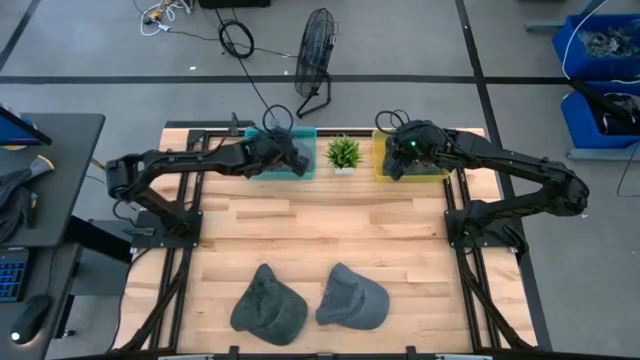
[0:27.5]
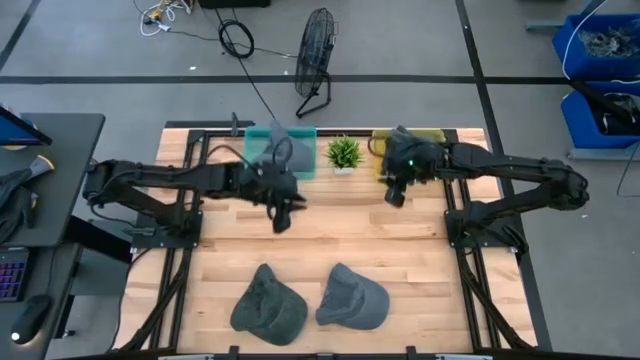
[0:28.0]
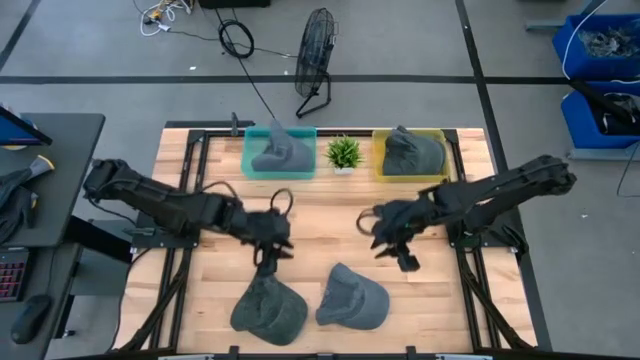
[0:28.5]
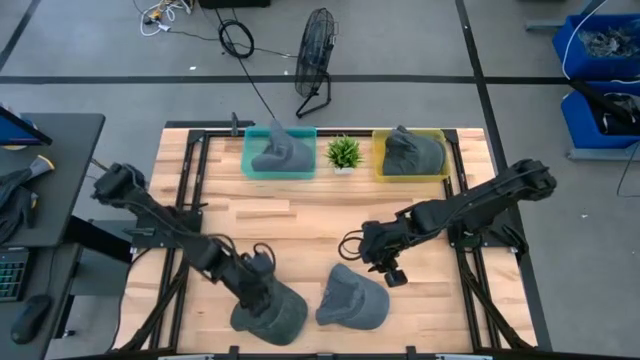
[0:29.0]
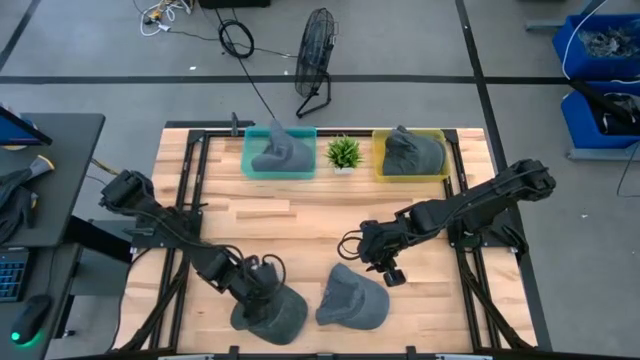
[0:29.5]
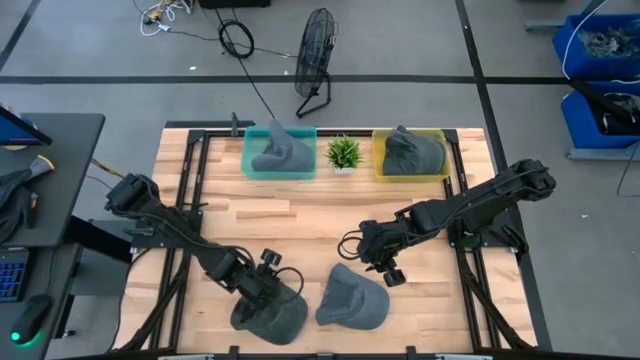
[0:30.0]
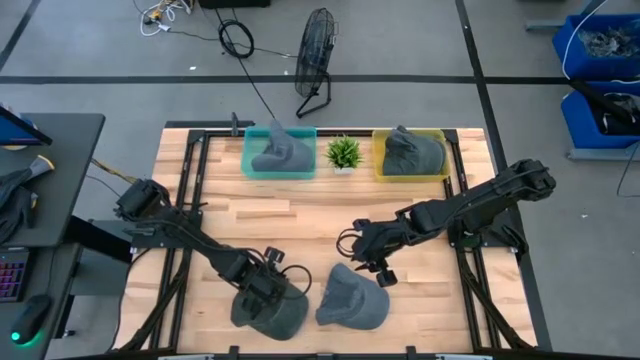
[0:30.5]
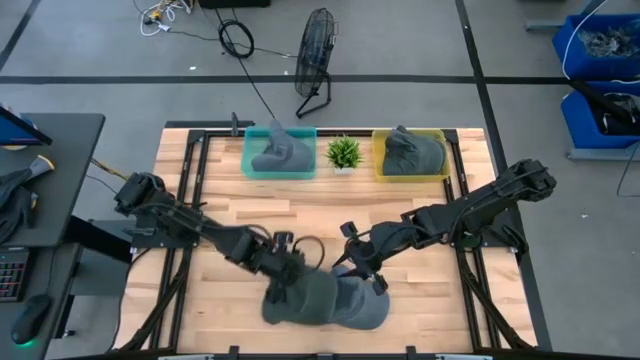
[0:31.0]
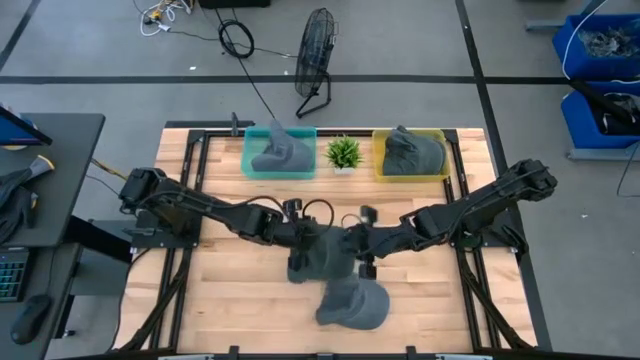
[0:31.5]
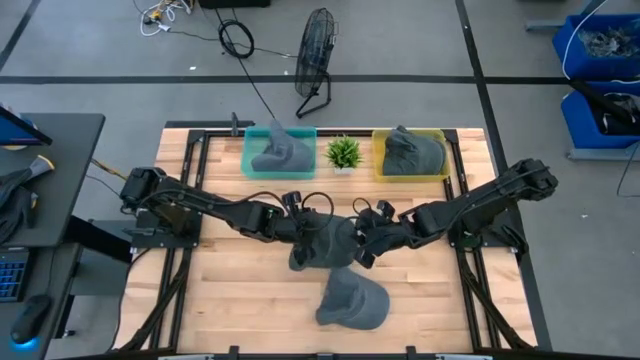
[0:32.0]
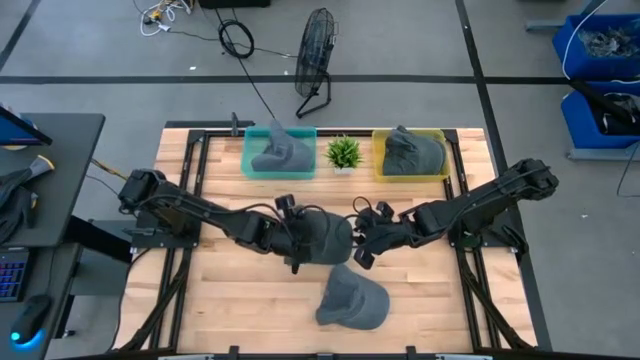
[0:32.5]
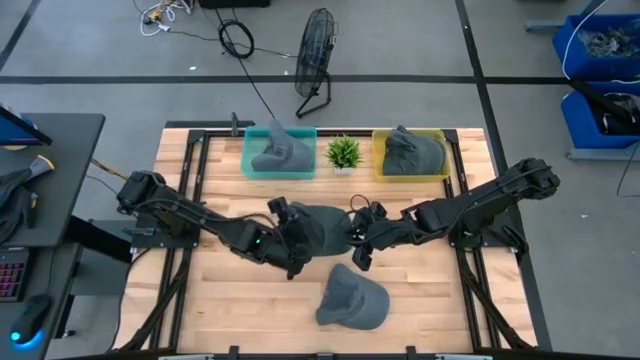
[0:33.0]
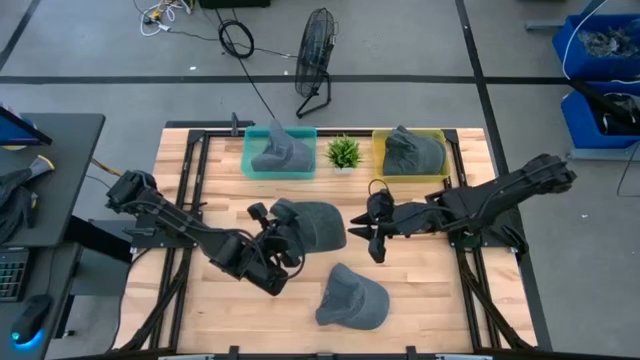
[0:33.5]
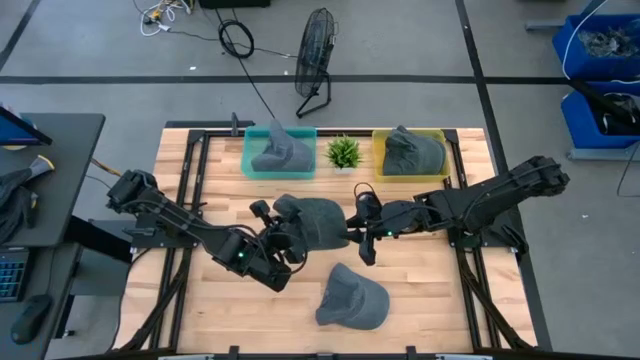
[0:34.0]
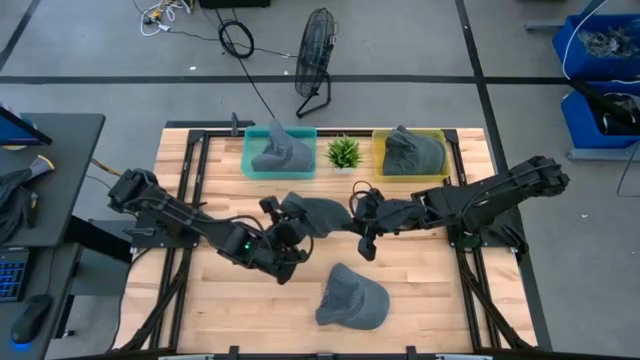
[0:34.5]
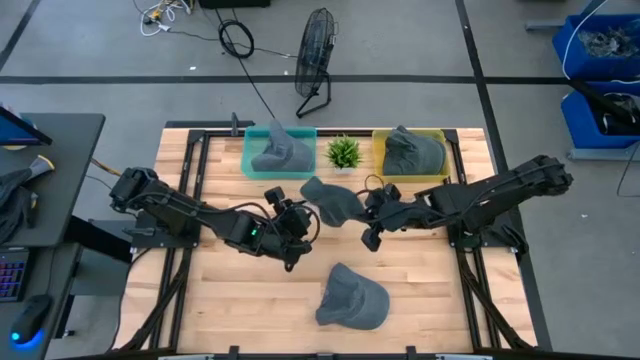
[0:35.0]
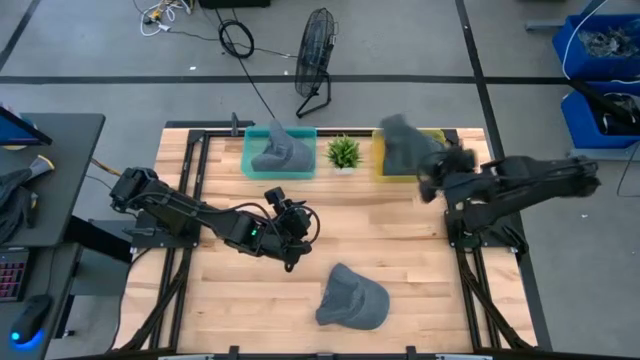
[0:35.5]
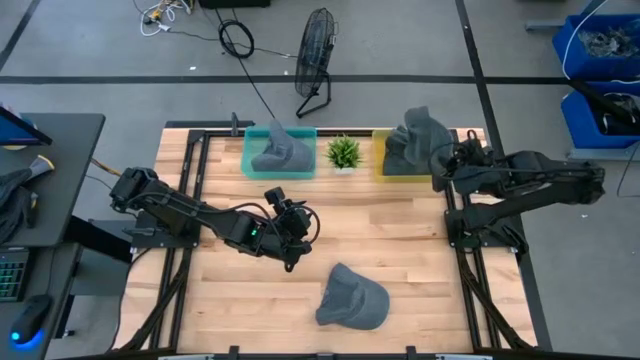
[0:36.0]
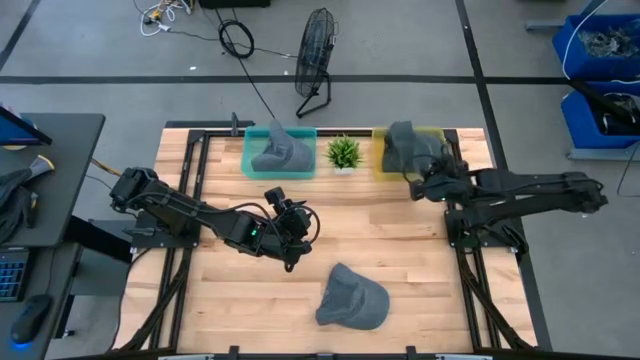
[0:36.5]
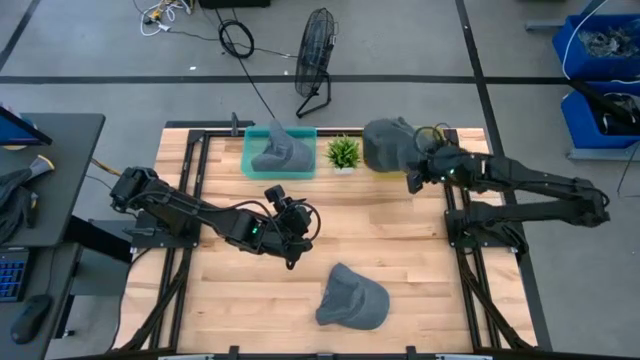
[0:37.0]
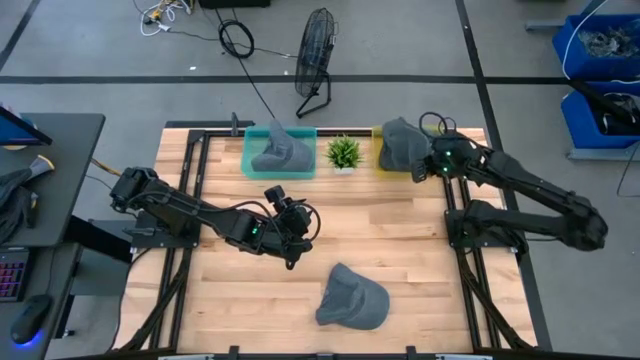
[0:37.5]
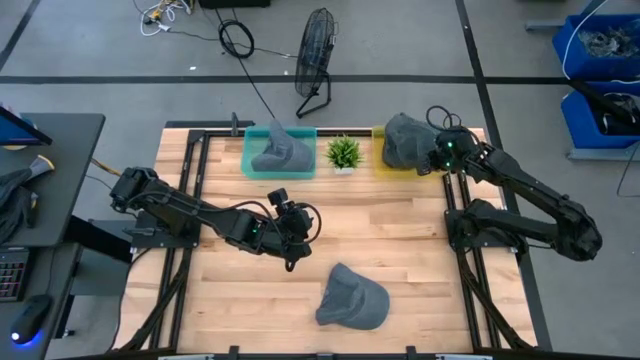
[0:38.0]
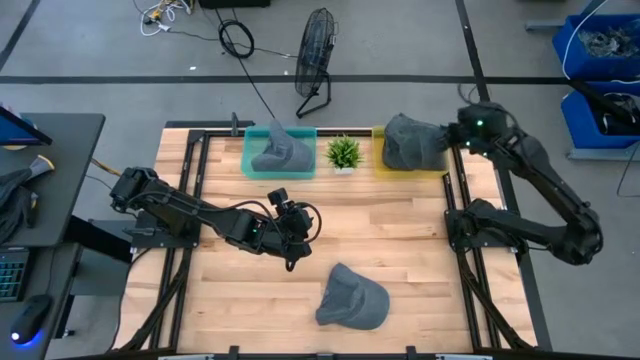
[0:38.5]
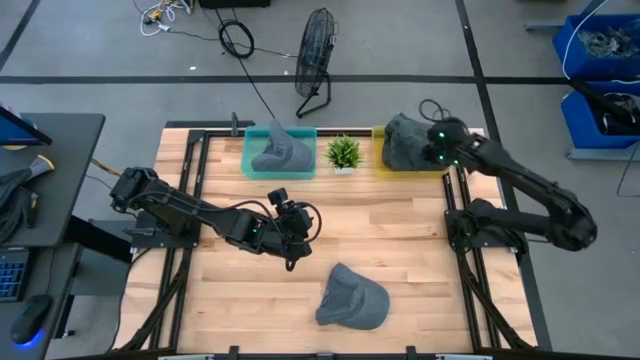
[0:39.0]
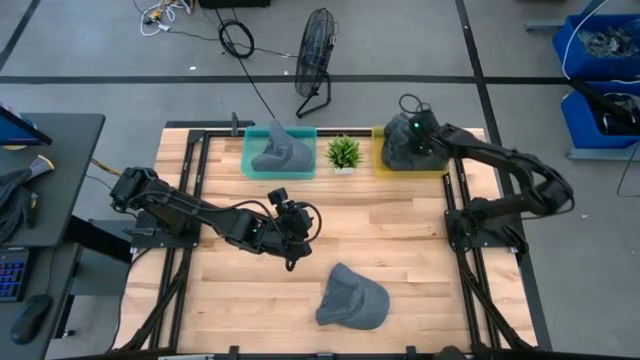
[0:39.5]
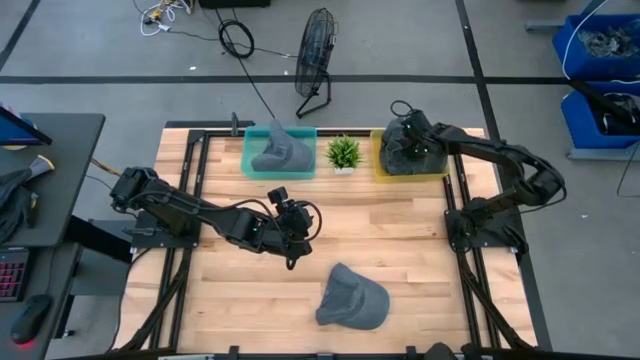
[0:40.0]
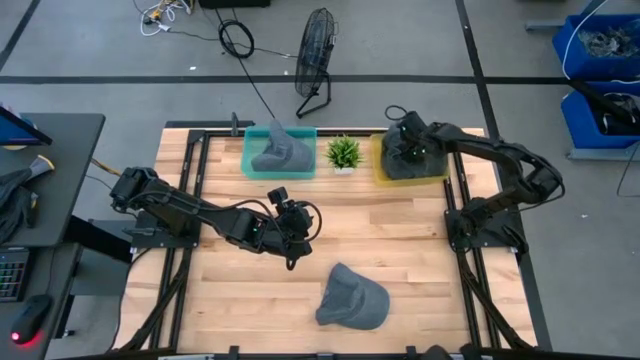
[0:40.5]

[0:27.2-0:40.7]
Task: Pick & Place hat
Put the black cap into the yellow bin

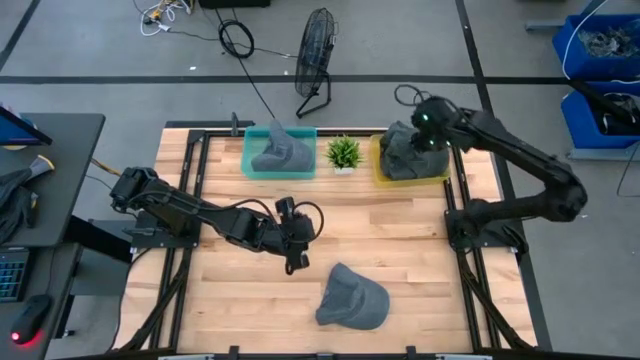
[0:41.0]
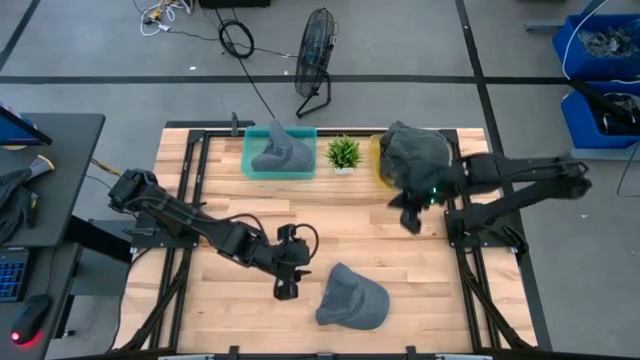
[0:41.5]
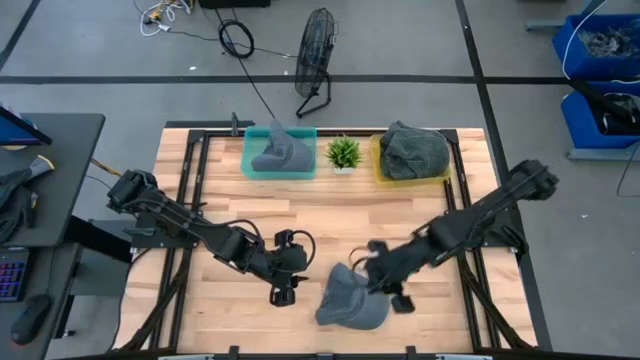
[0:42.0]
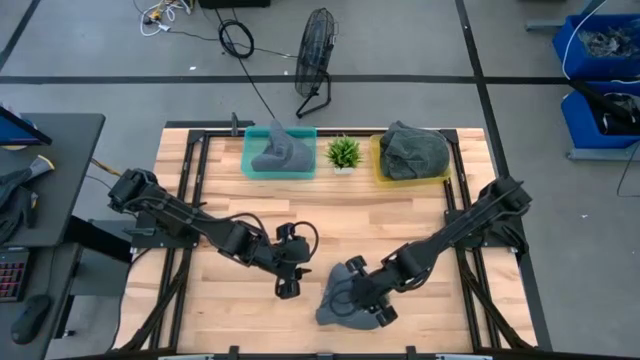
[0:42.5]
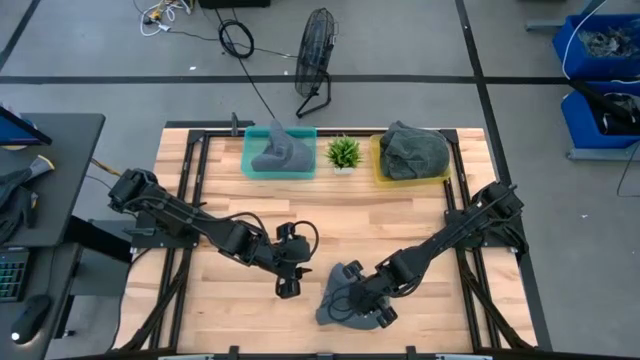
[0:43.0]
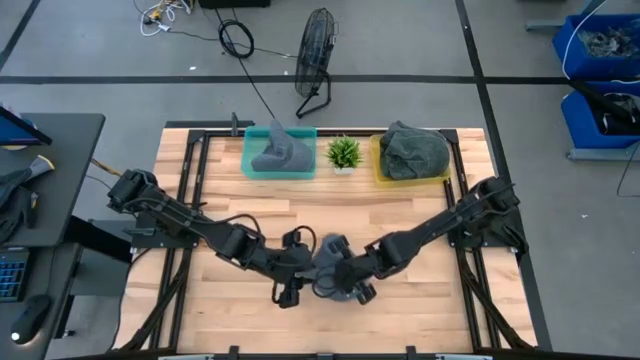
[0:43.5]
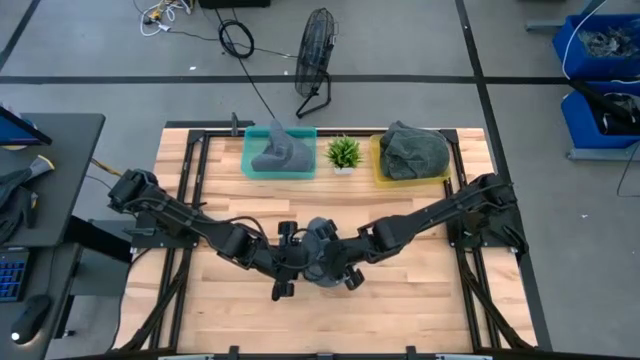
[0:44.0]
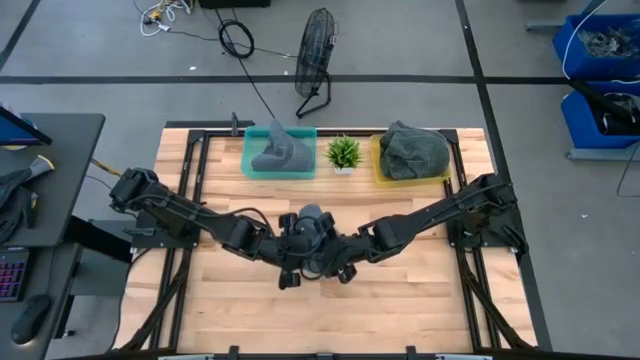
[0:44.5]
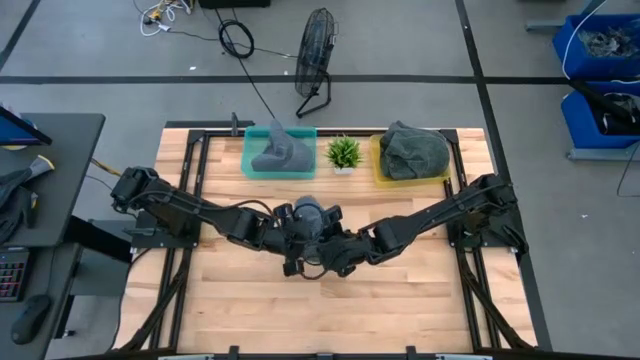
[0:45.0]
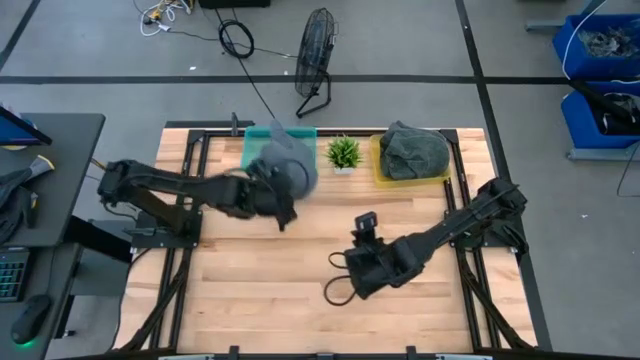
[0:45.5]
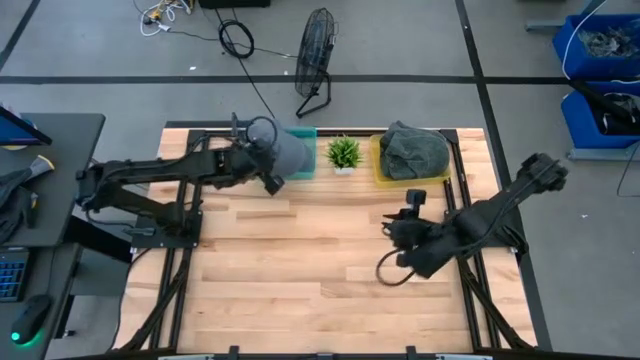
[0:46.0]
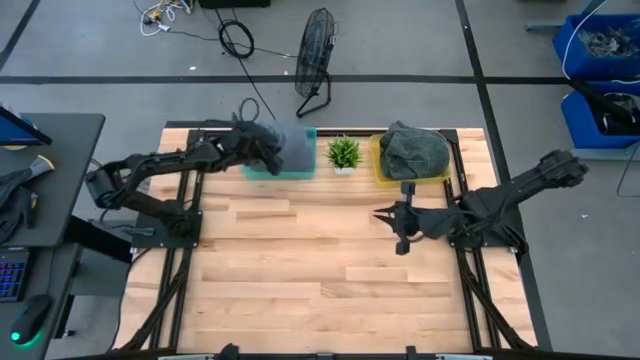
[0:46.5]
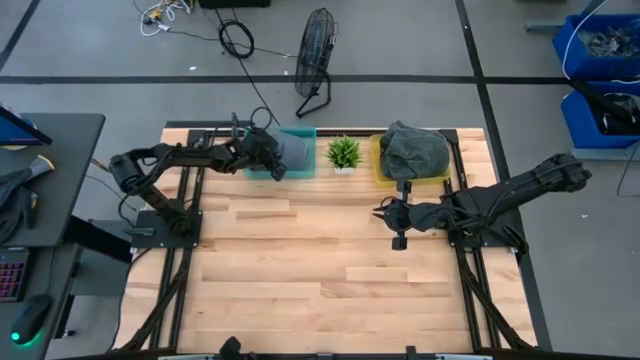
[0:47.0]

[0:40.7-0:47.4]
Put the blue cap into the blue bin
